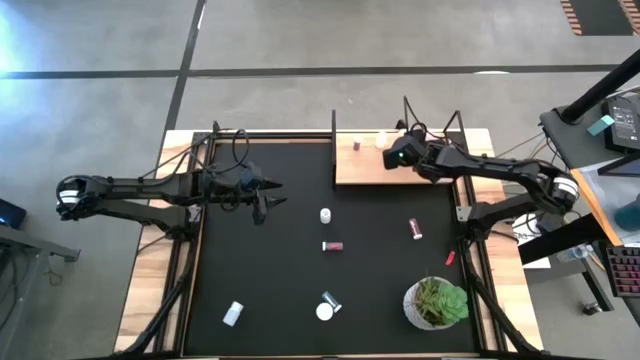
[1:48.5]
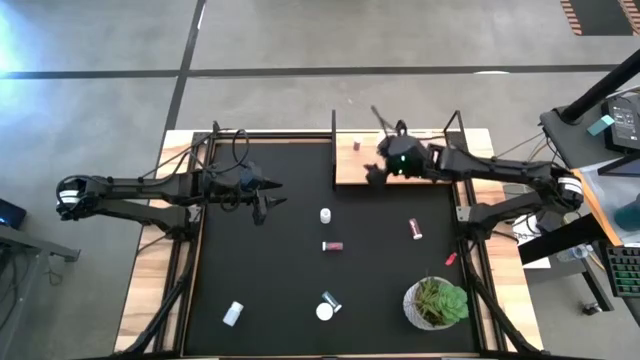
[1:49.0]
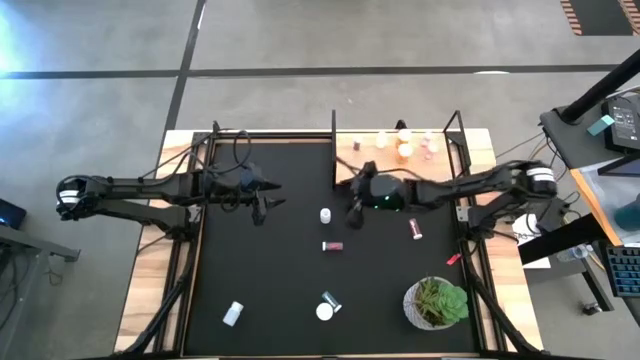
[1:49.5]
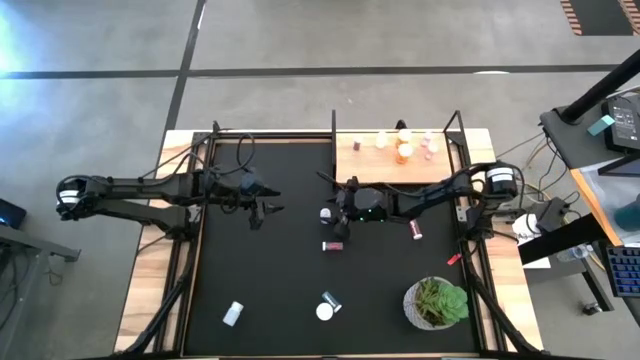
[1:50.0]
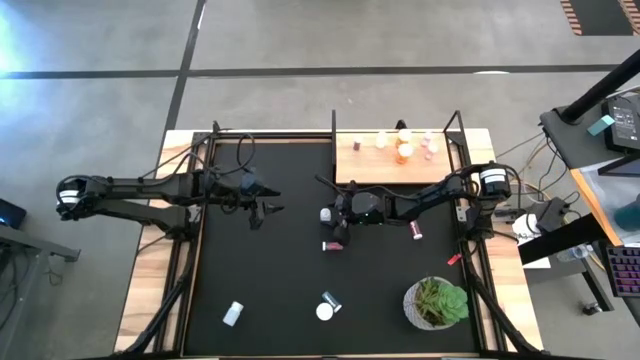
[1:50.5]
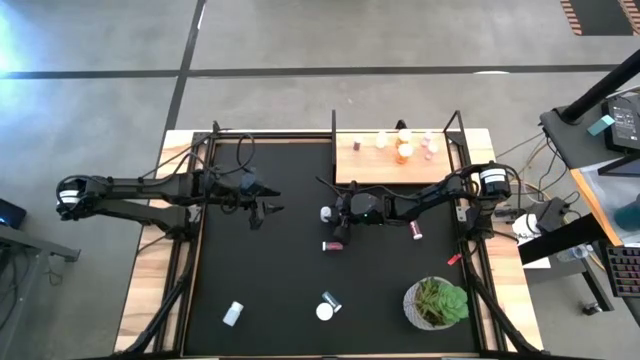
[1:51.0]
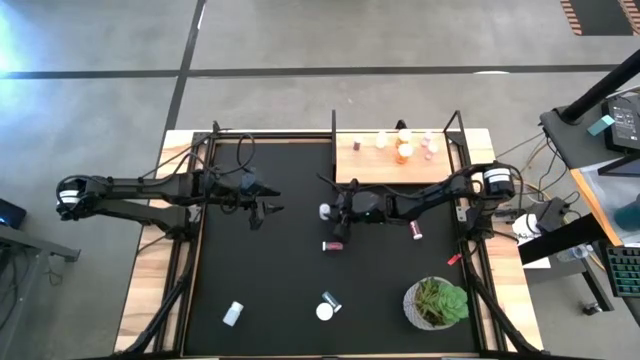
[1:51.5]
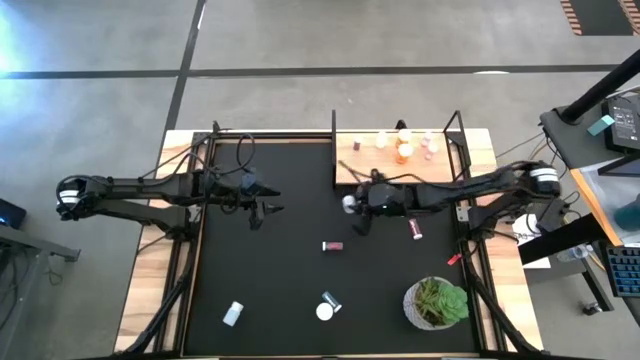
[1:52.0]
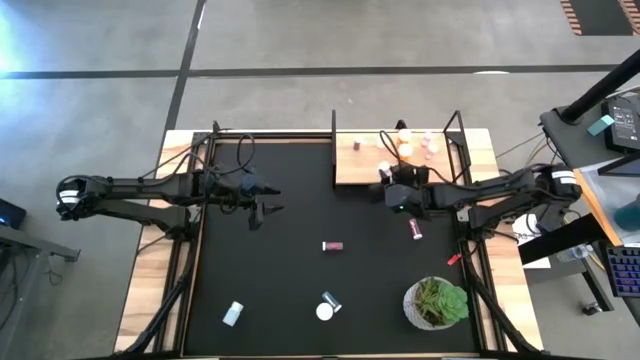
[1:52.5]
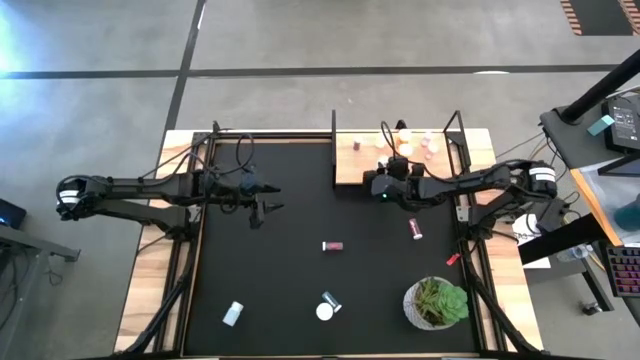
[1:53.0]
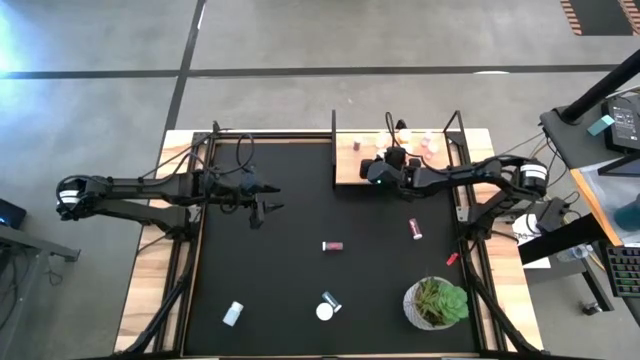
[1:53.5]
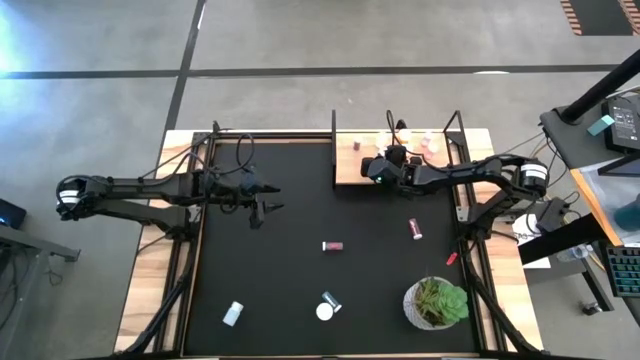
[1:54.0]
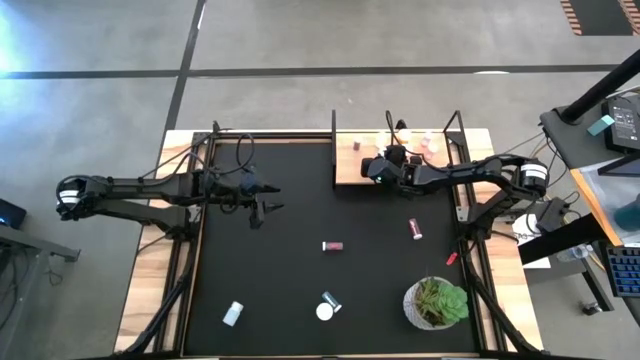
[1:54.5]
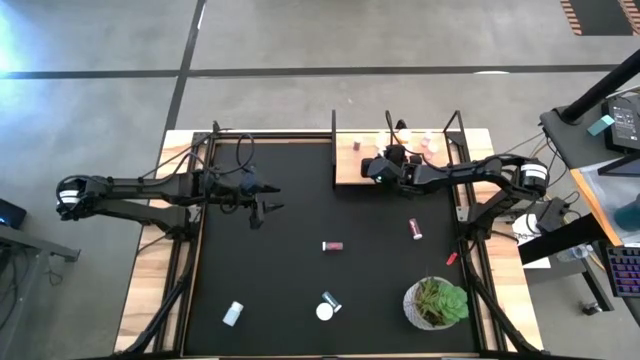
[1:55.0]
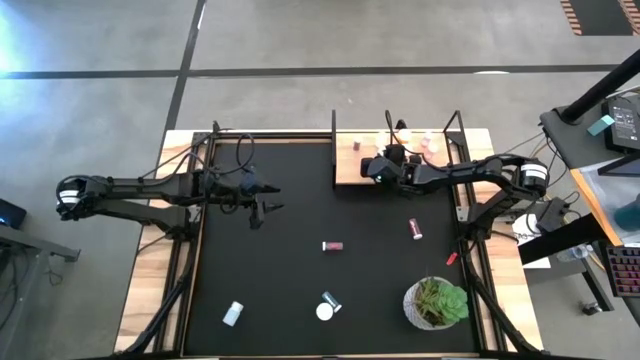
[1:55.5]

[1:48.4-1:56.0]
Task: Pick and place medicine bottles onto shelf by color
Put the top white pill bottle on the shelf aligned with the other white pill bottle

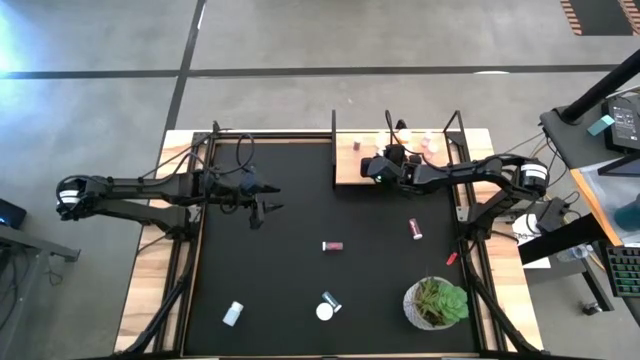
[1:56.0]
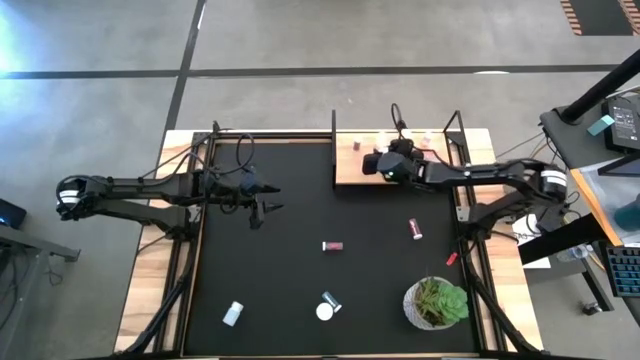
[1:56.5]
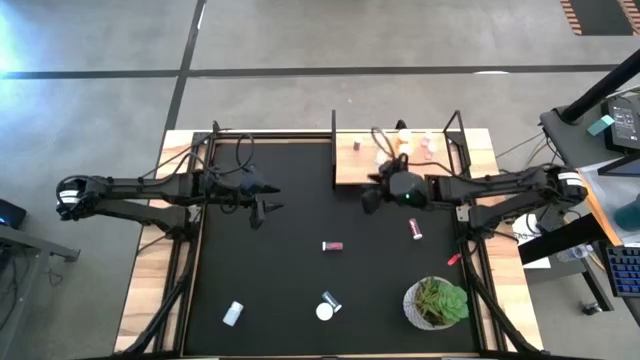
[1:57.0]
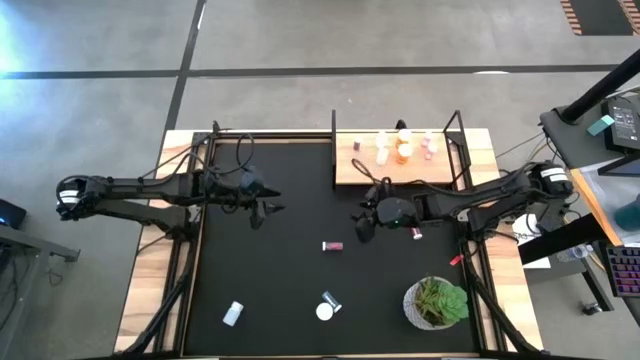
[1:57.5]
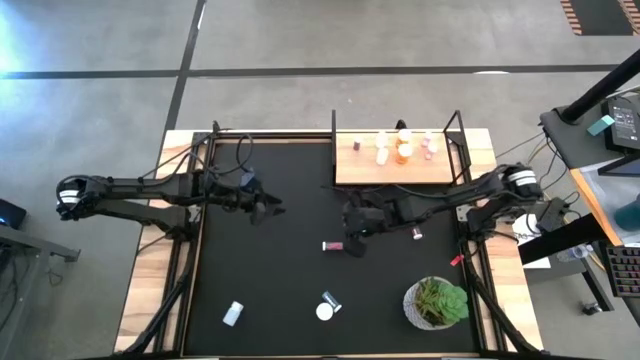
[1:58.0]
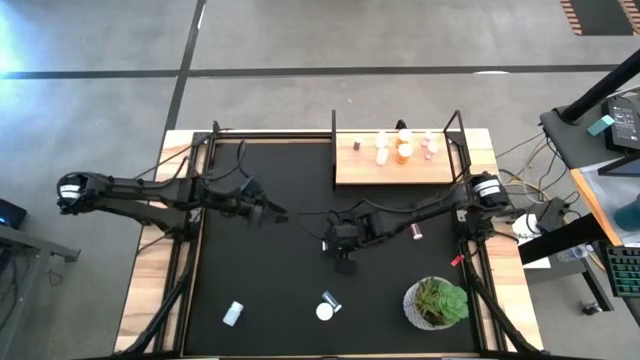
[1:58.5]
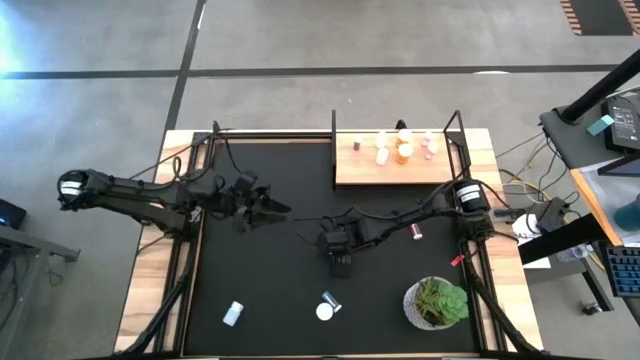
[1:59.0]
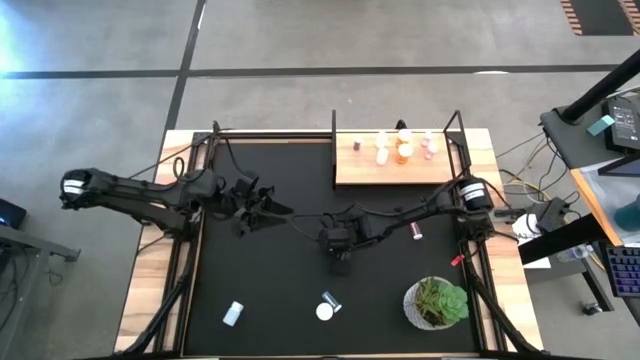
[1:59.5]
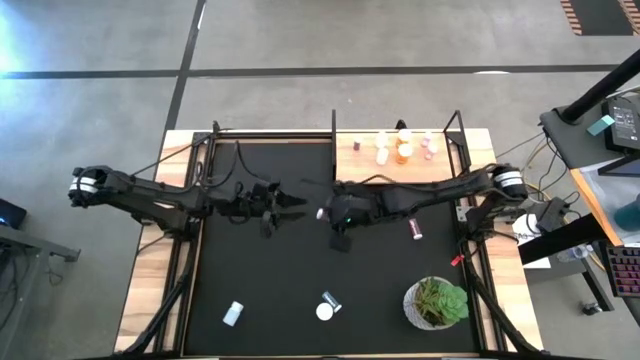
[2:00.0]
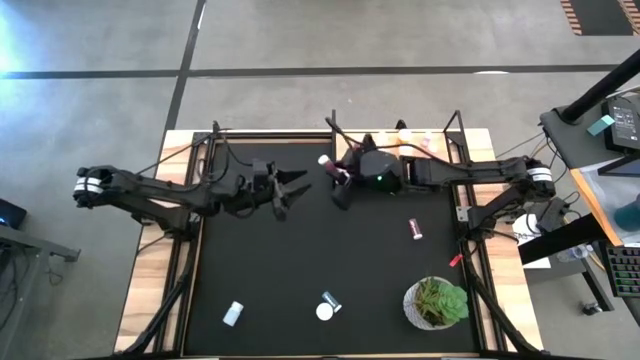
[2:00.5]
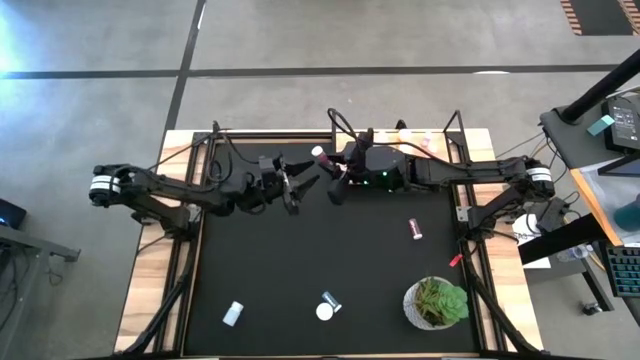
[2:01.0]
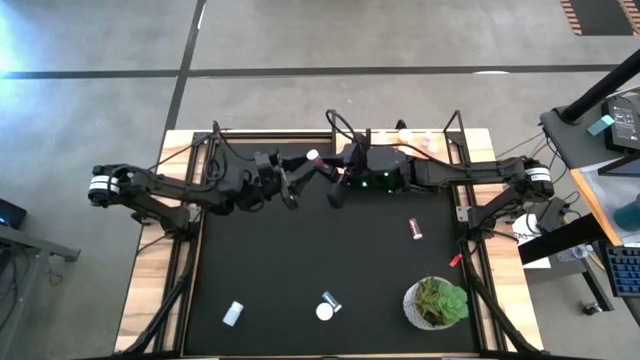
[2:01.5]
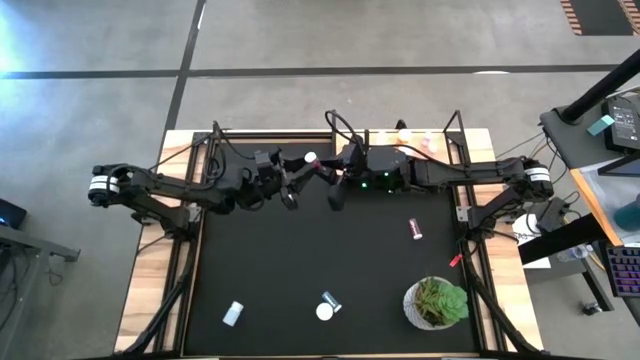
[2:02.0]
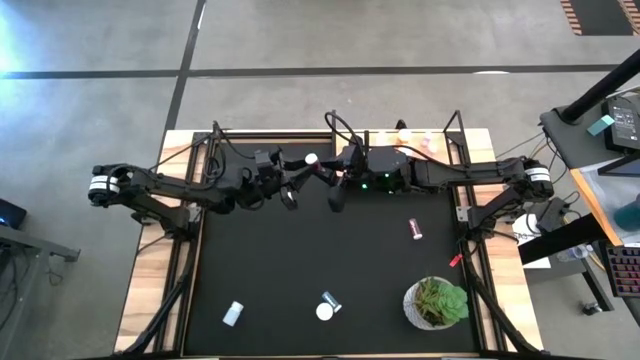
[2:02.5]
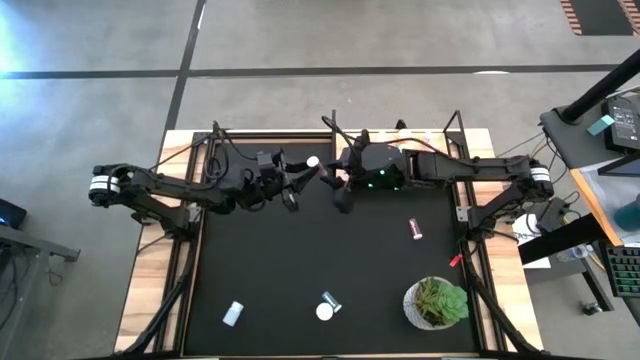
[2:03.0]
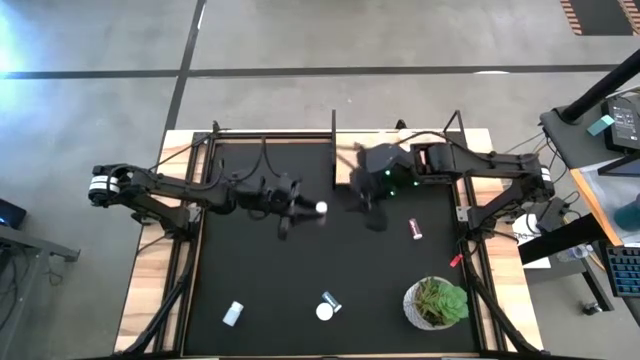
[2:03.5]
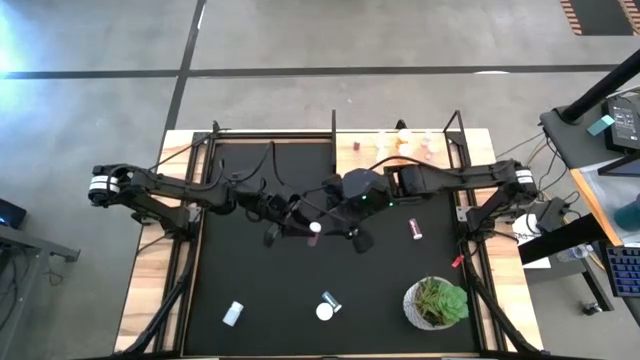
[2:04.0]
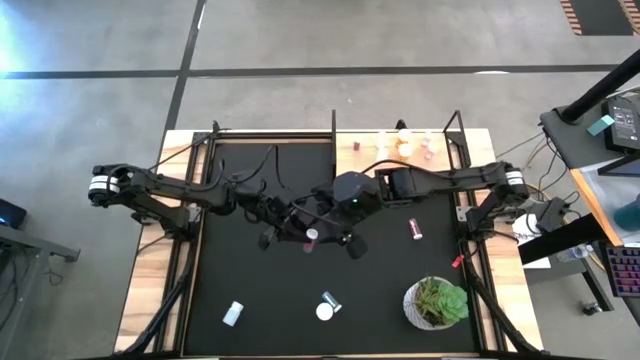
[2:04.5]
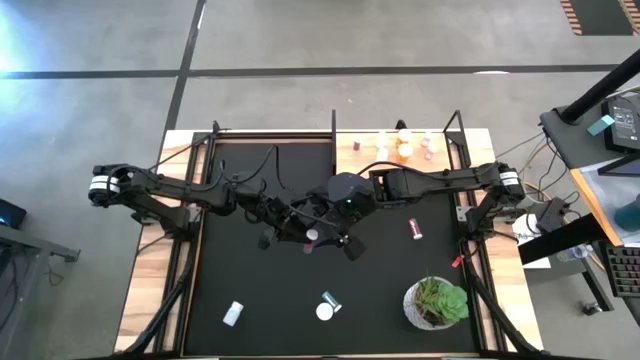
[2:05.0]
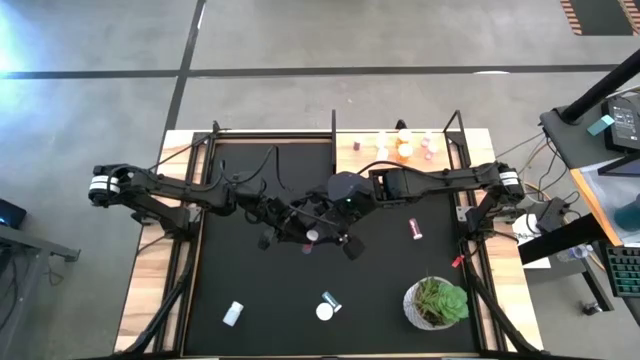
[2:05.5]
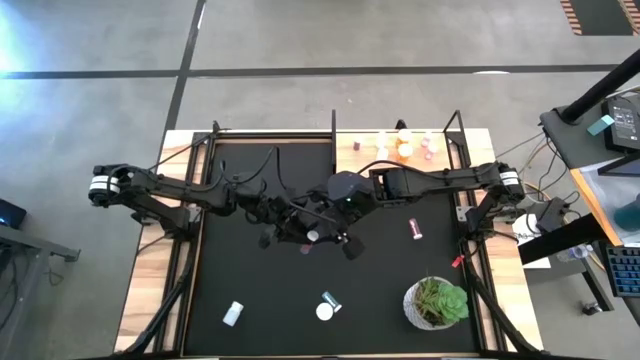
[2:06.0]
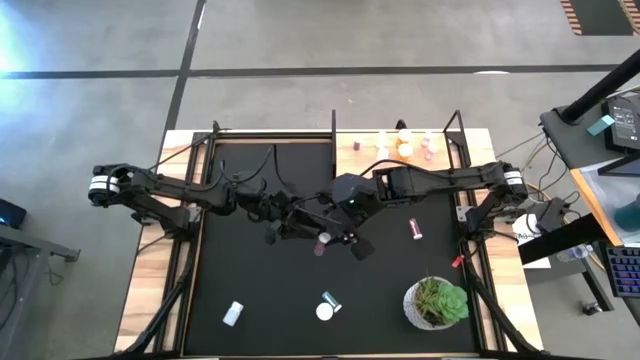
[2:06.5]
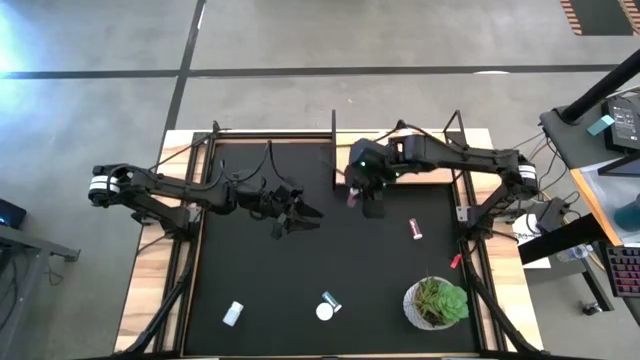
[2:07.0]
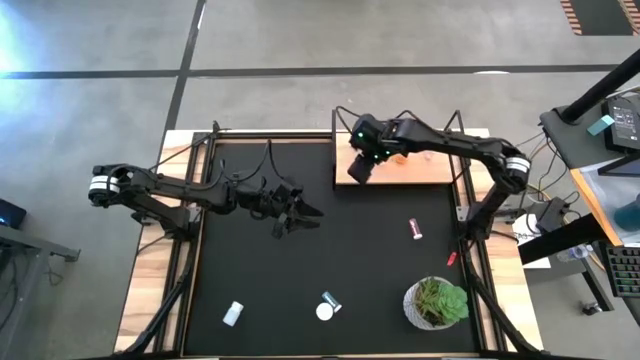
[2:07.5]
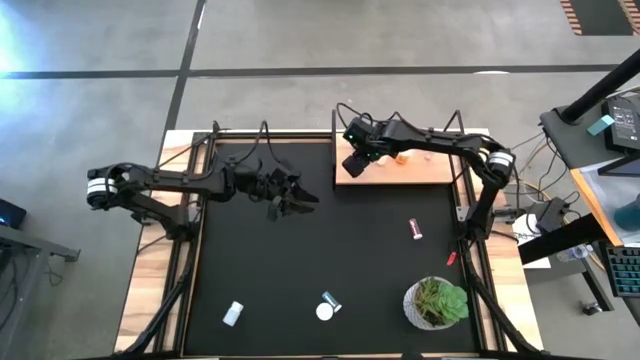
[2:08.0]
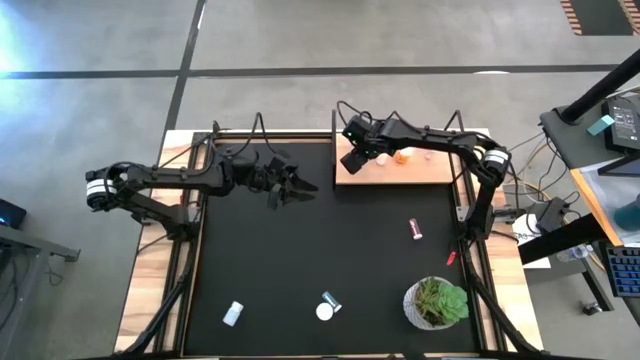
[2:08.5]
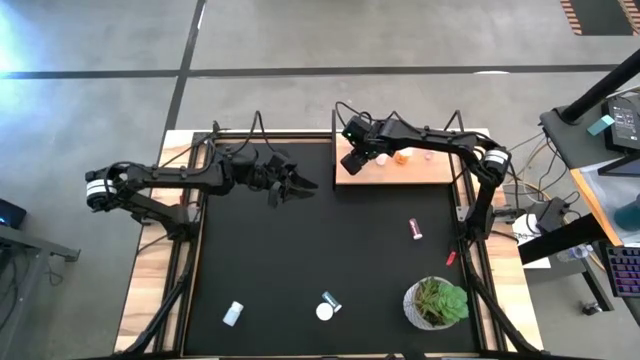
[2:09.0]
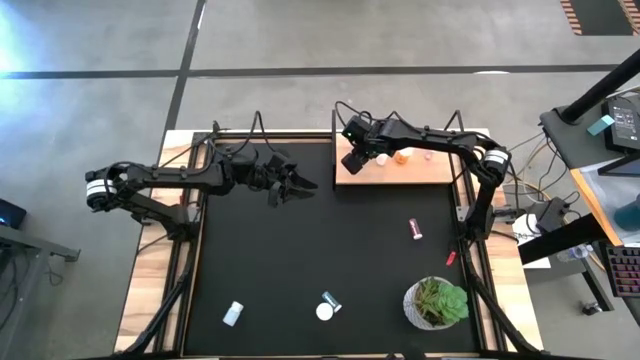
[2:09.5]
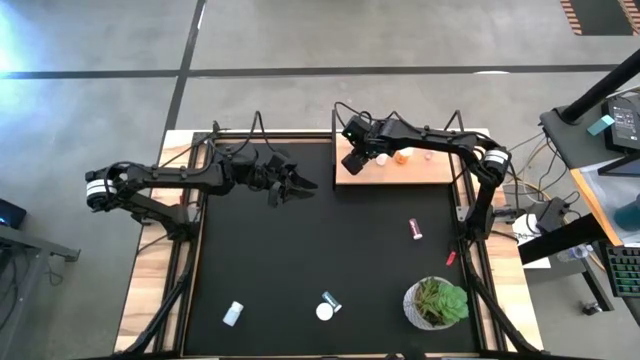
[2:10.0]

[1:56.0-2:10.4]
Put the top blue pill bottle on the shelf aligned with the other blue pill bottle
